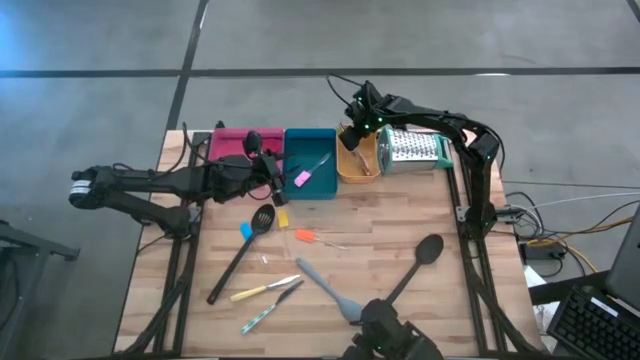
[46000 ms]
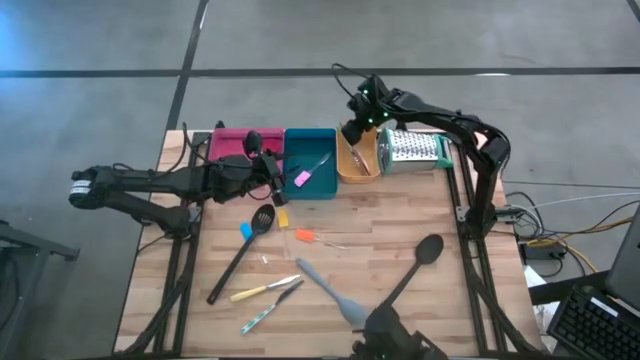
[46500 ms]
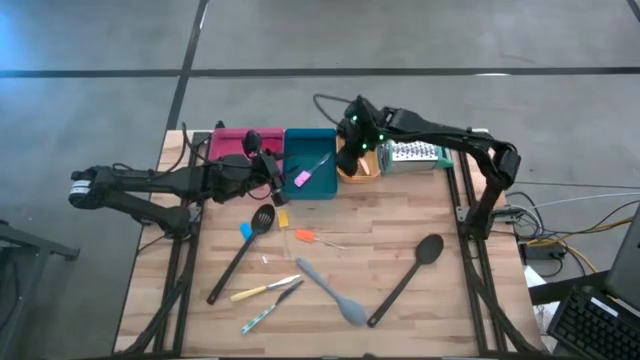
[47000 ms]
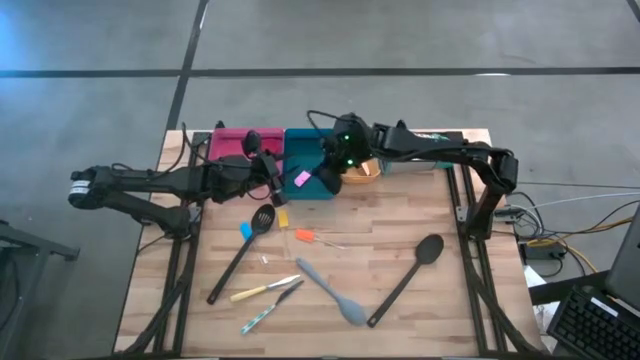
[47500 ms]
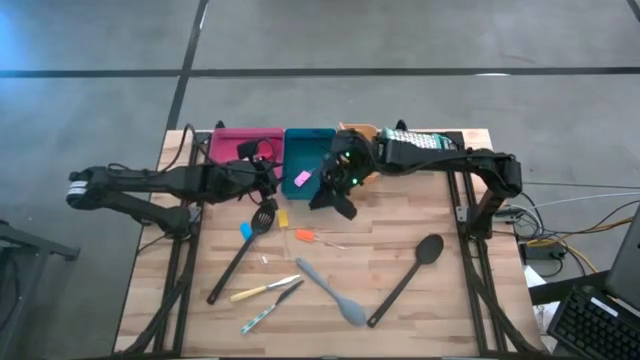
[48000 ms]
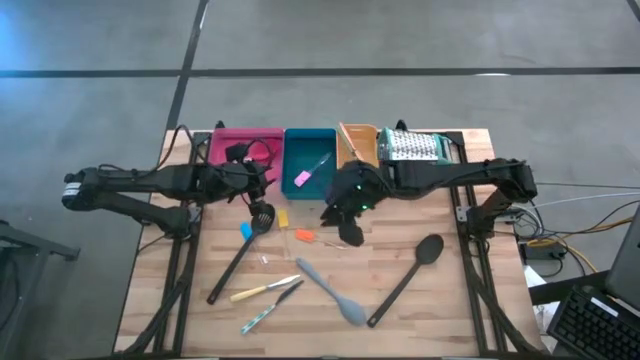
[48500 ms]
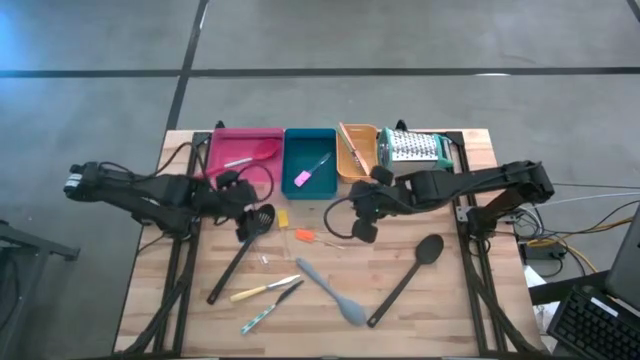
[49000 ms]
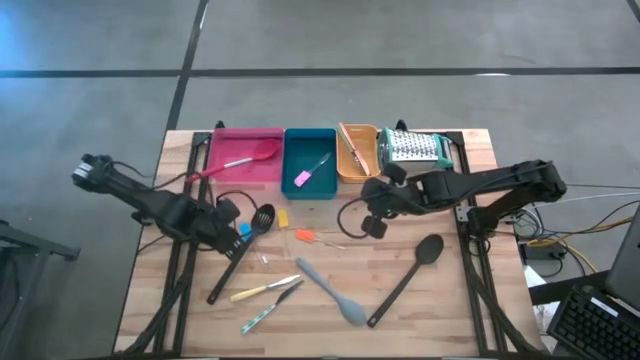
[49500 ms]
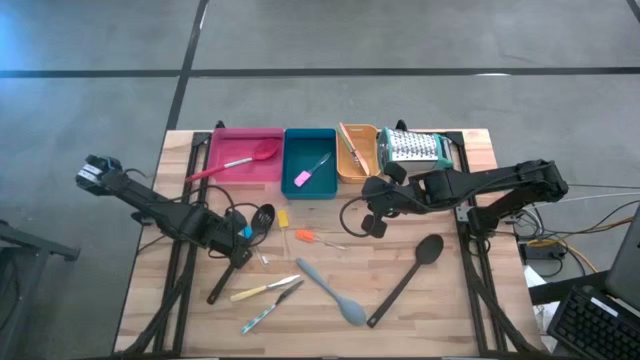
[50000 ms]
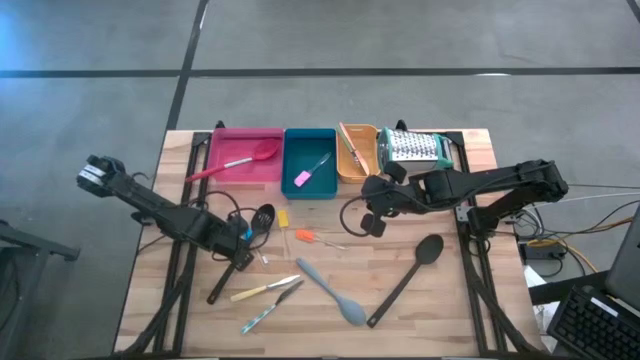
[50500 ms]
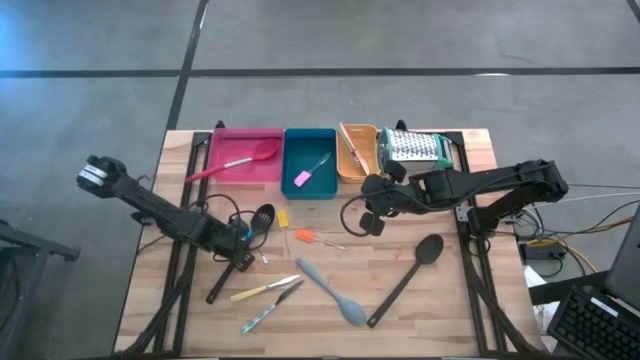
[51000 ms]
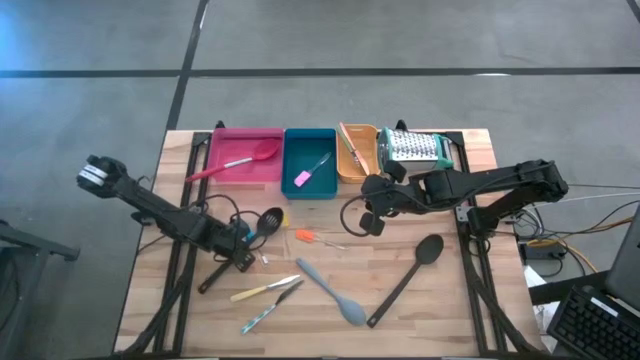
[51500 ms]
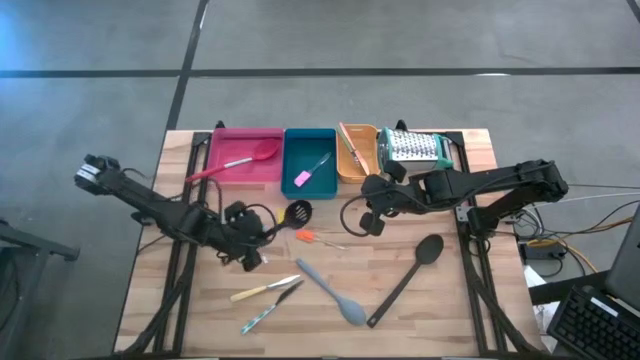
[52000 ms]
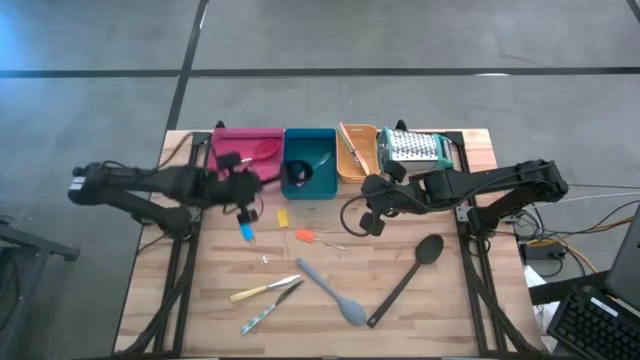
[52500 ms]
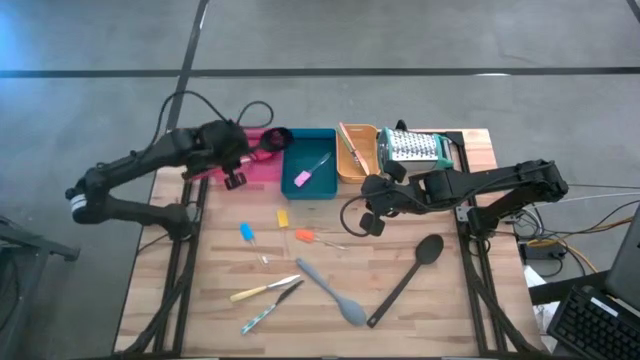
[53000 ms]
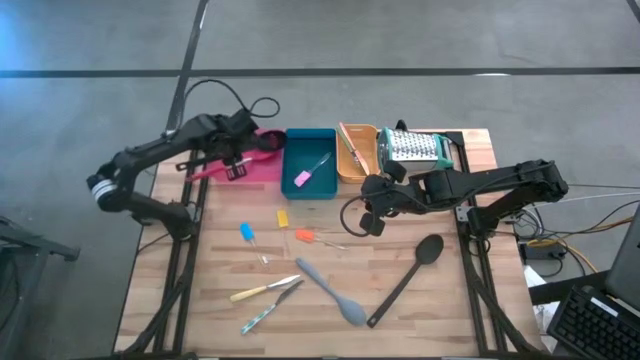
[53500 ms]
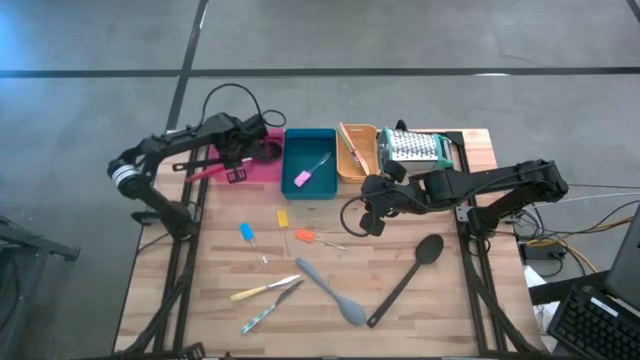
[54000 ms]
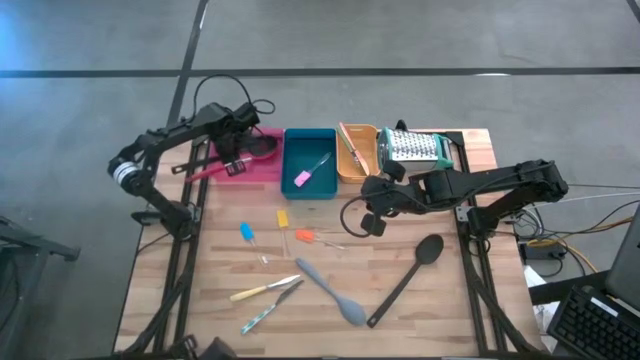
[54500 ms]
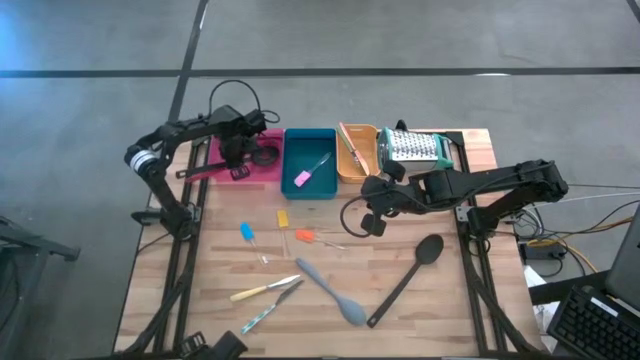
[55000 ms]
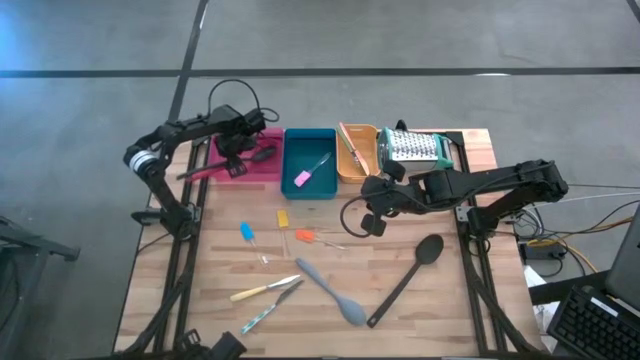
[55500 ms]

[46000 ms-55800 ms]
Task: Pick & Place Kitchen Items
Put the black spoon into the pink bin

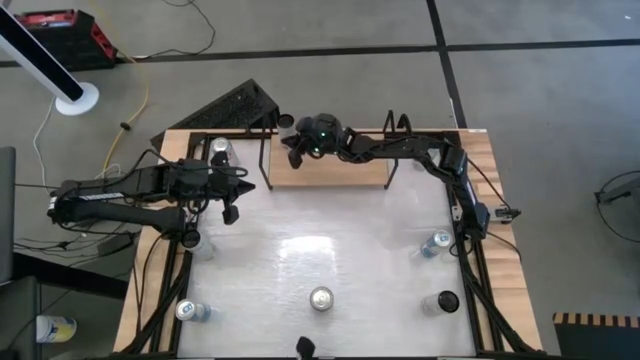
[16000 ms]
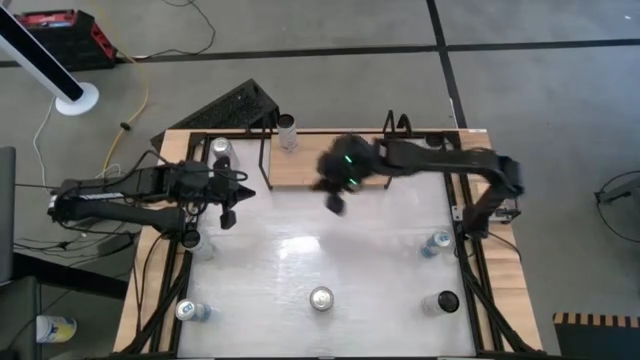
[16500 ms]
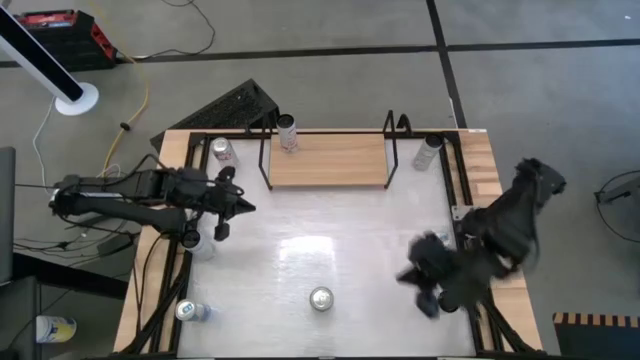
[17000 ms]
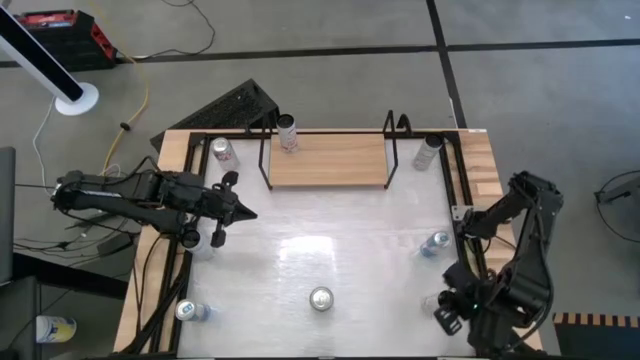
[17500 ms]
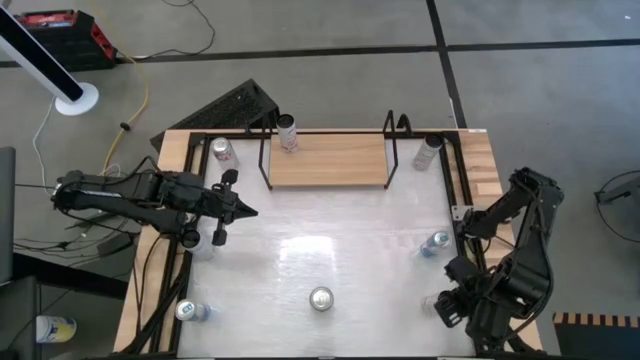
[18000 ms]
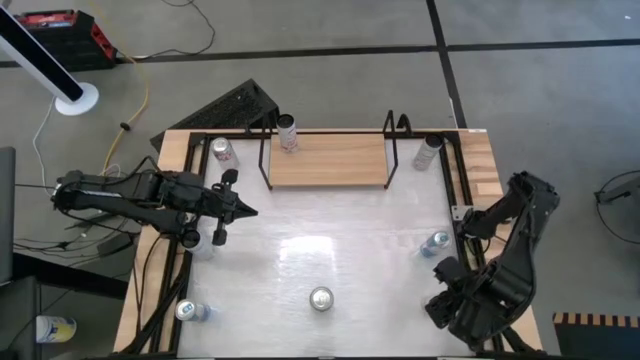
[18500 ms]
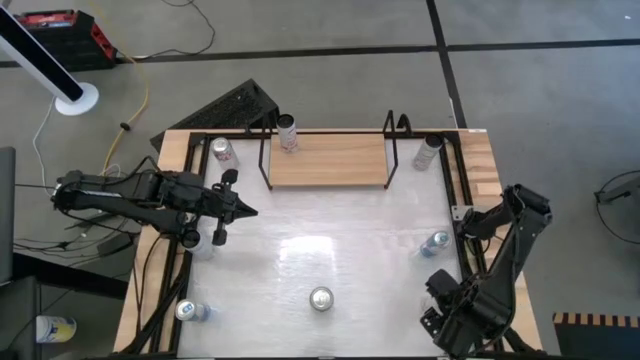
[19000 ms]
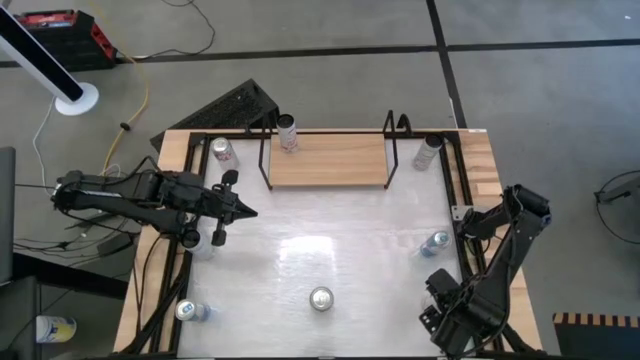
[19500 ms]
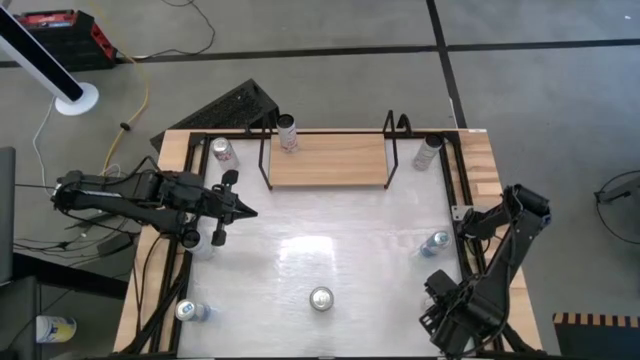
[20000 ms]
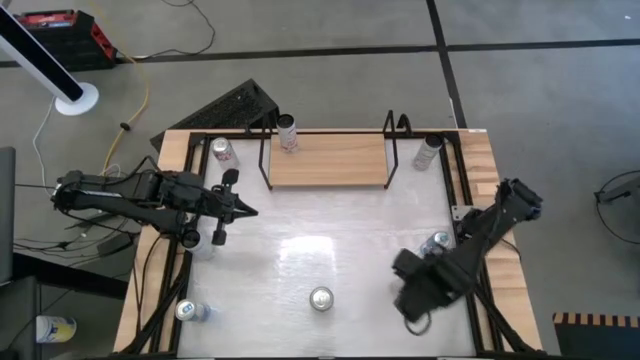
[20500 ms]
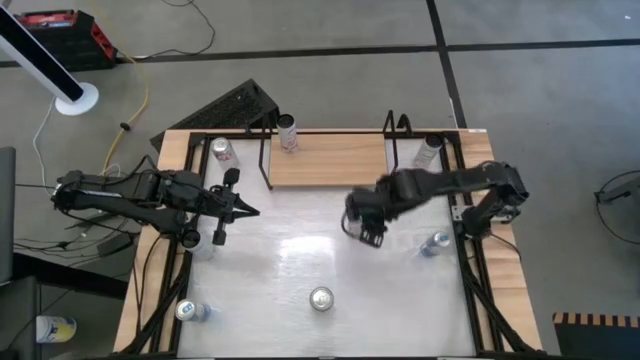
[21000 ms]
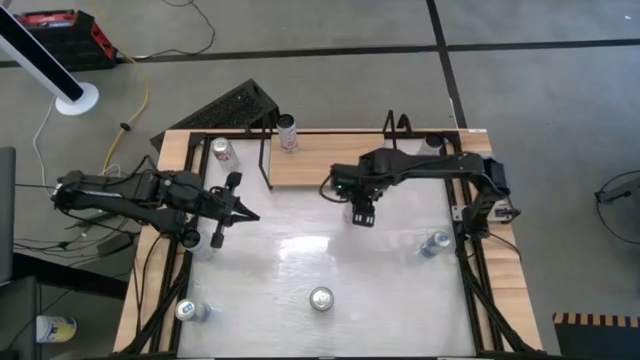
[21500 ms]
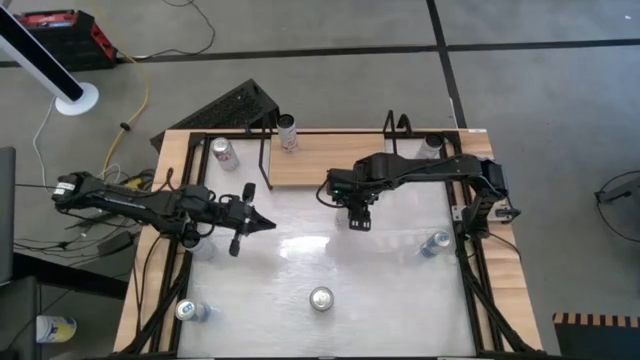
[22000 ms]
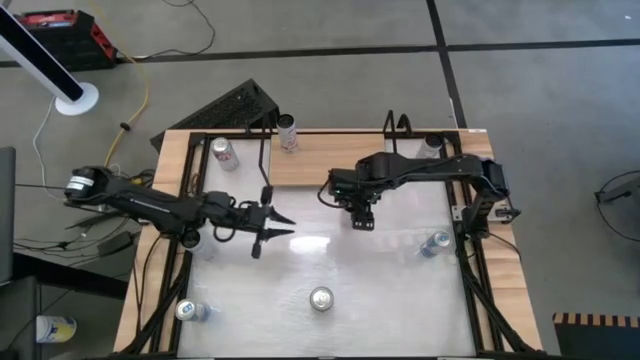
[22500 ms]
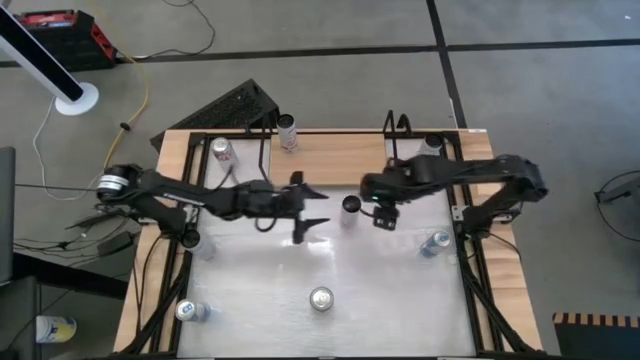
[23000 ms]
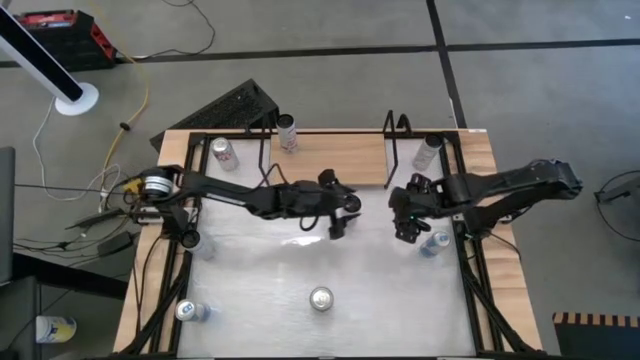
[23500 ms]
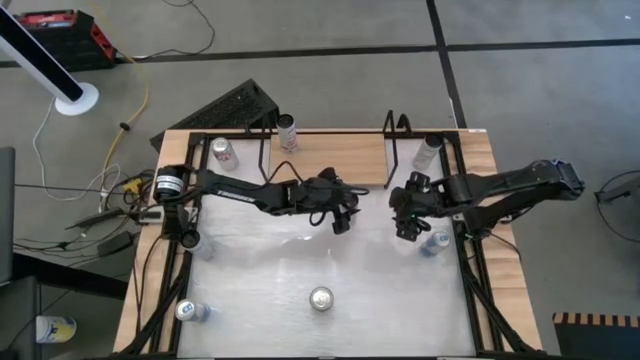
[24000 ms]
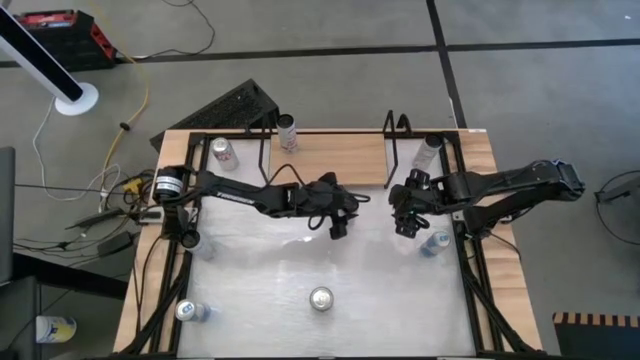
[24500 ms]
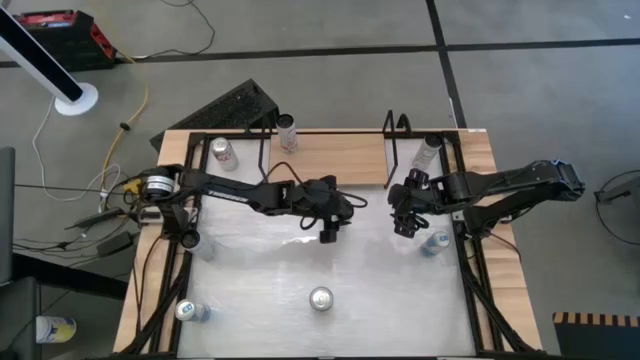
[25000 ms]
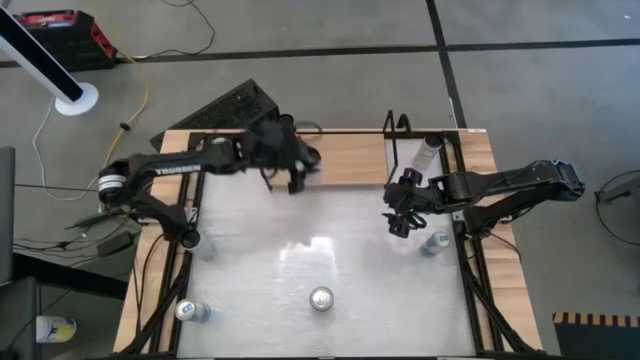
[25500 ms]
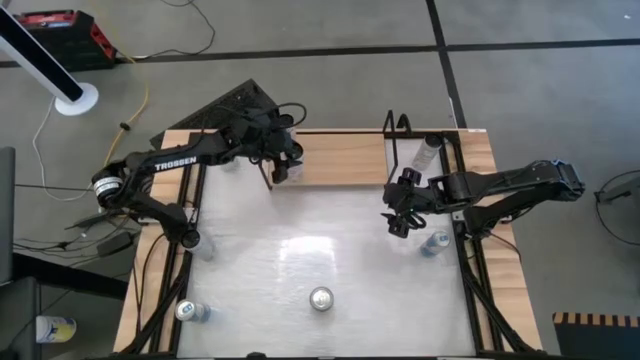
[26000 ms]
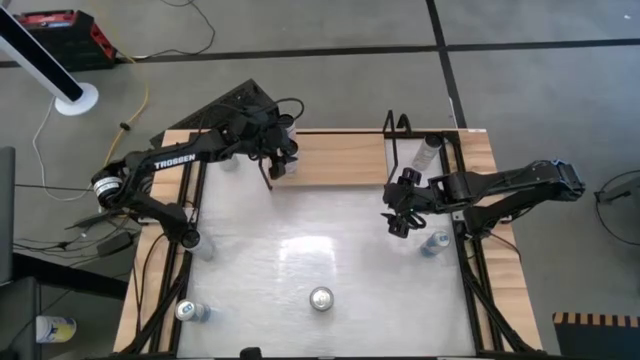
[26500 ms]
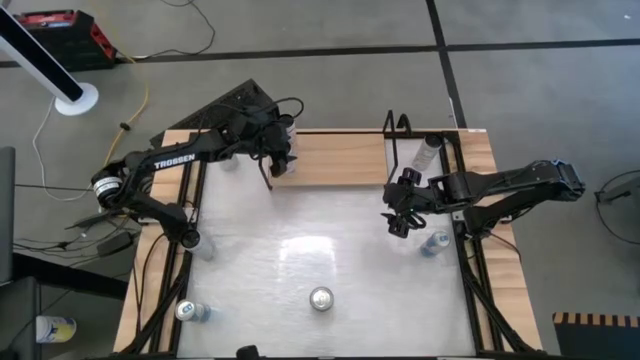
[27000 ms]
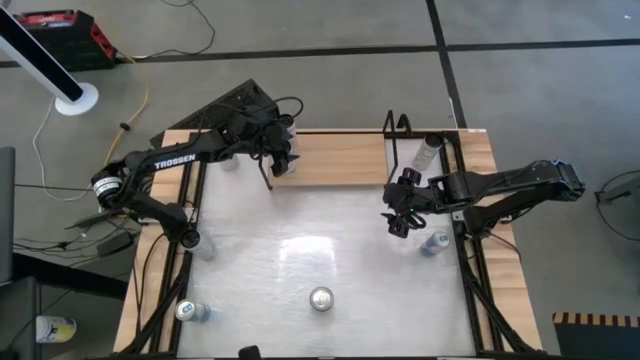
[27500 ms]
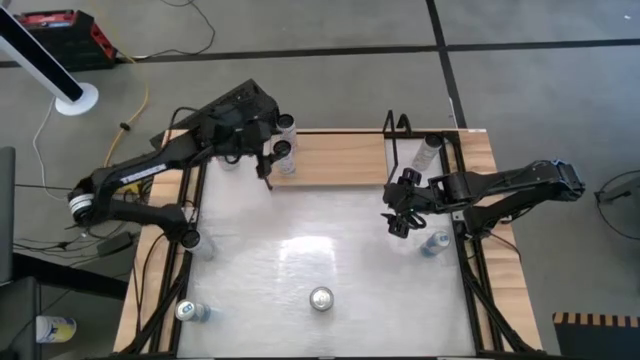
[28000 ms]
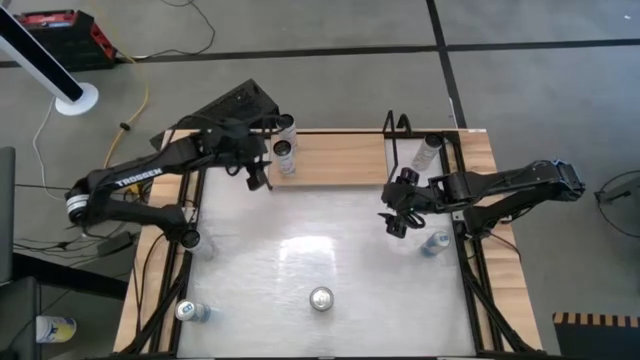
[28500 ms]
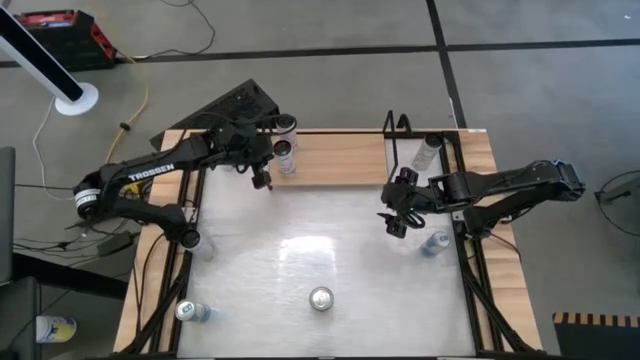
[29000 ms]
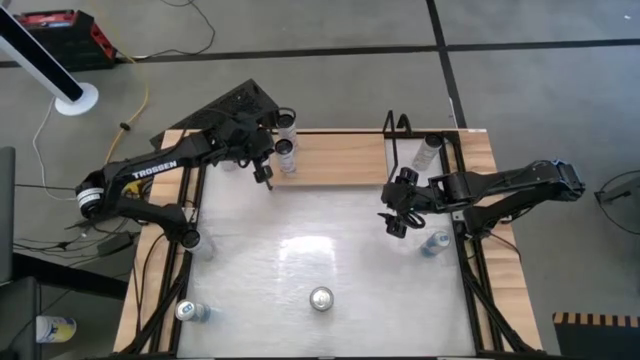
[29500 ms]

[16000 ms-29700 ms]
Task: Place canned beverage on shelf
Put the top white-pink soda can on the shelf aligned with the other white-pink soda can
